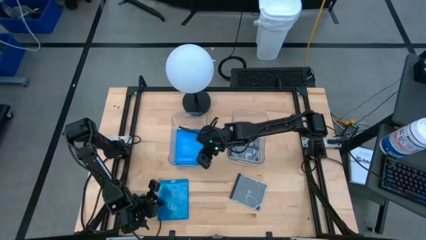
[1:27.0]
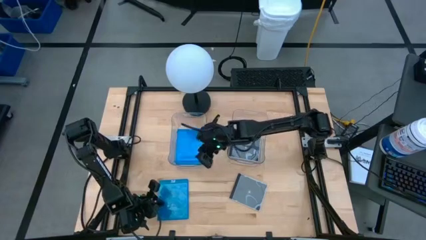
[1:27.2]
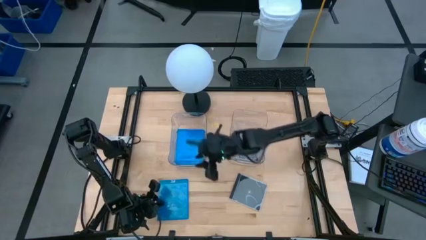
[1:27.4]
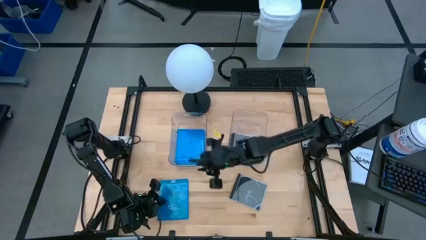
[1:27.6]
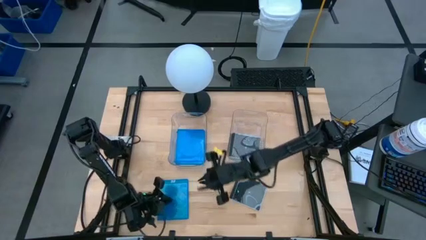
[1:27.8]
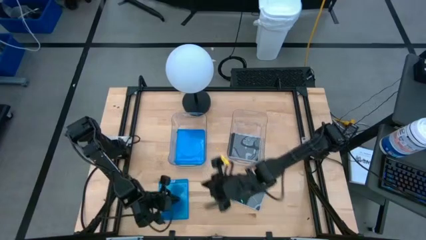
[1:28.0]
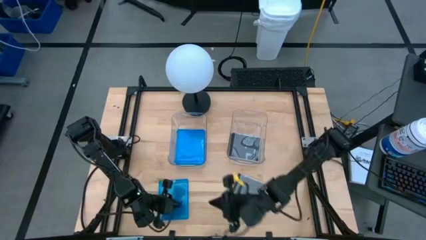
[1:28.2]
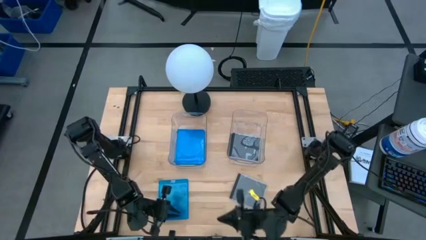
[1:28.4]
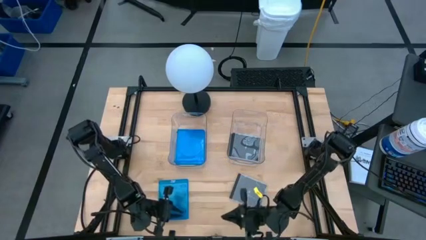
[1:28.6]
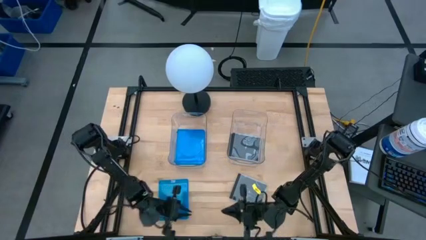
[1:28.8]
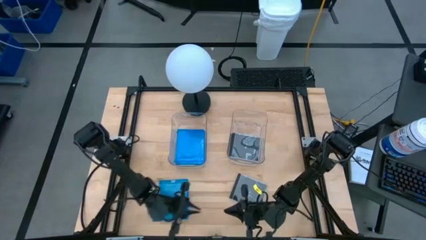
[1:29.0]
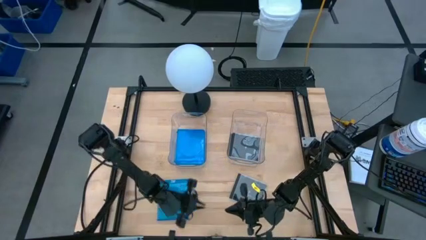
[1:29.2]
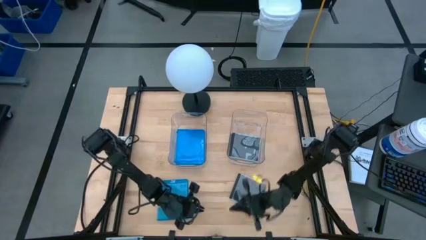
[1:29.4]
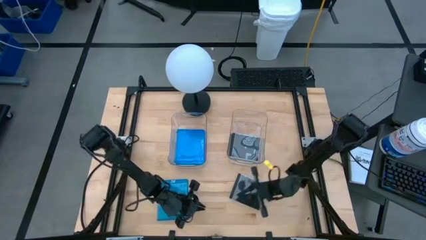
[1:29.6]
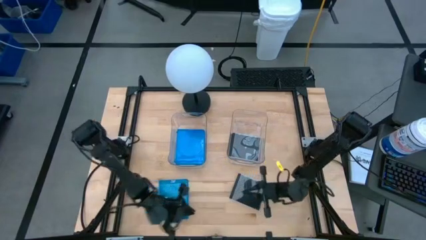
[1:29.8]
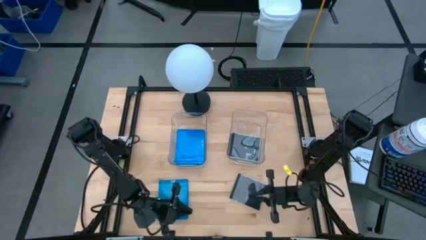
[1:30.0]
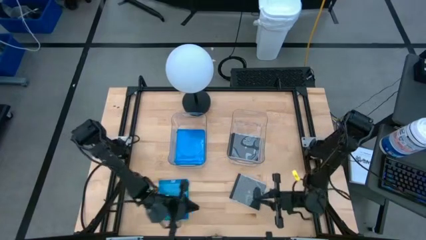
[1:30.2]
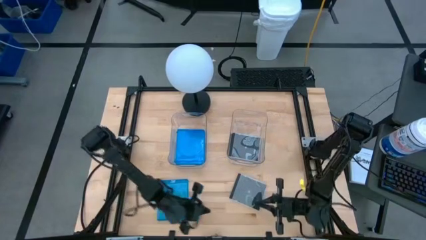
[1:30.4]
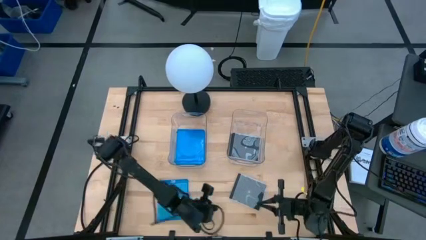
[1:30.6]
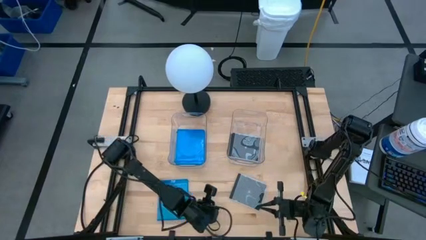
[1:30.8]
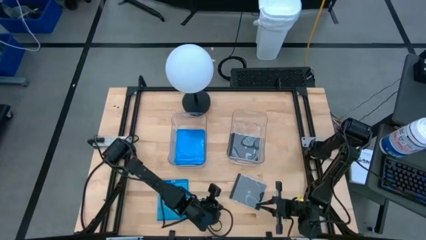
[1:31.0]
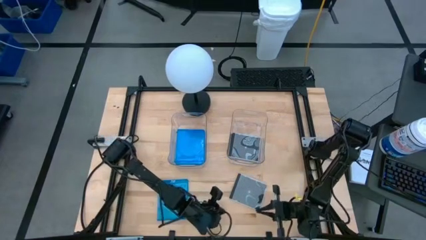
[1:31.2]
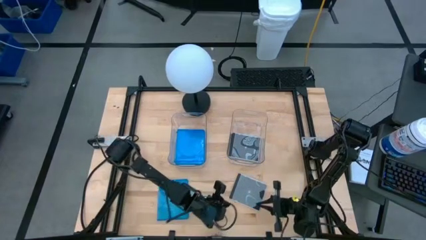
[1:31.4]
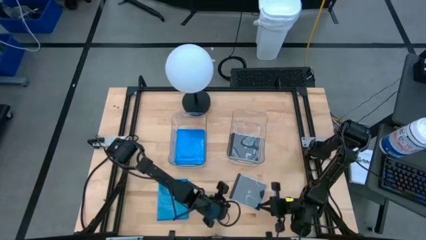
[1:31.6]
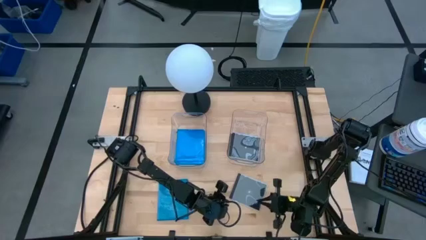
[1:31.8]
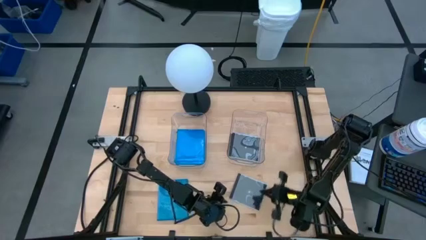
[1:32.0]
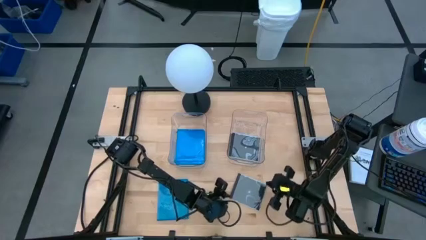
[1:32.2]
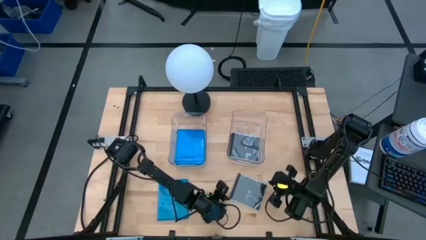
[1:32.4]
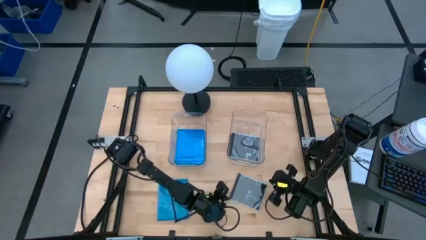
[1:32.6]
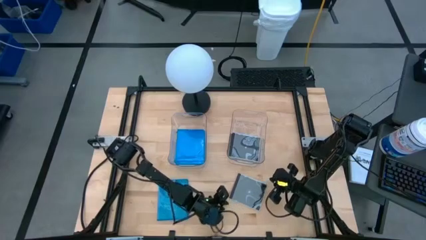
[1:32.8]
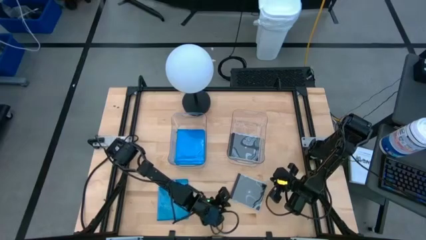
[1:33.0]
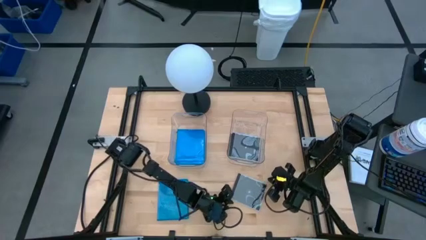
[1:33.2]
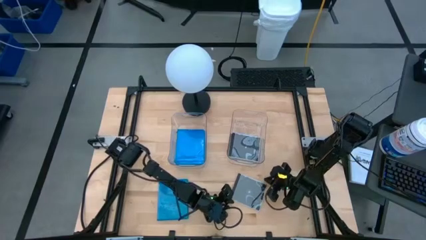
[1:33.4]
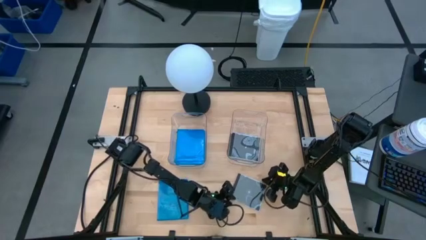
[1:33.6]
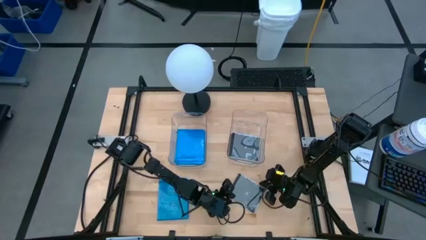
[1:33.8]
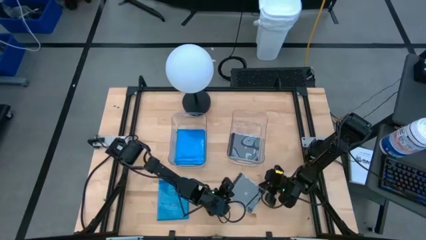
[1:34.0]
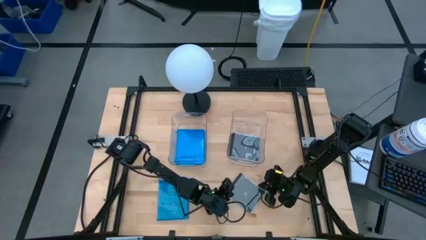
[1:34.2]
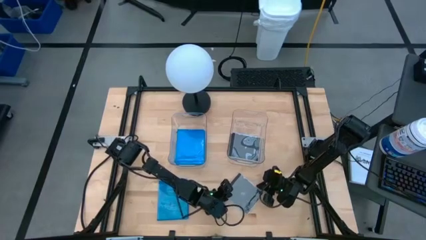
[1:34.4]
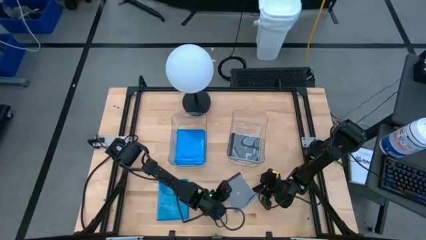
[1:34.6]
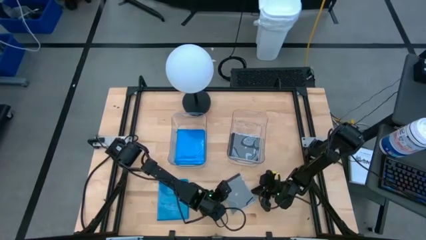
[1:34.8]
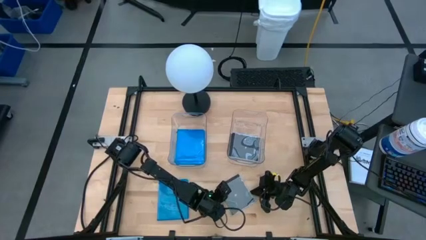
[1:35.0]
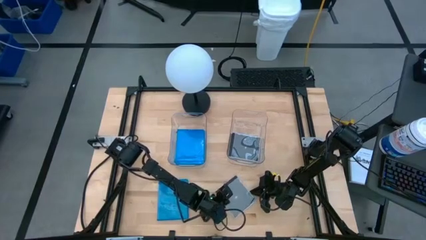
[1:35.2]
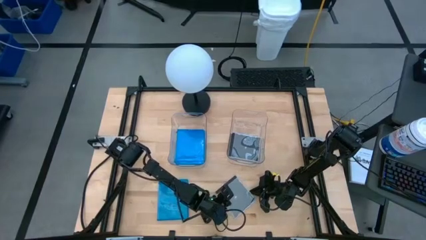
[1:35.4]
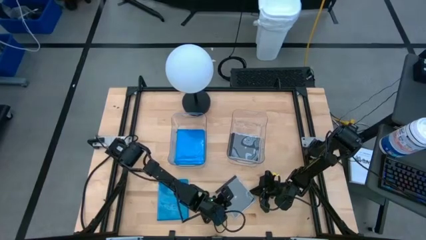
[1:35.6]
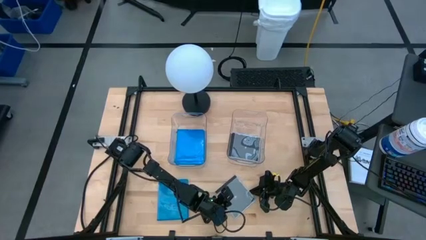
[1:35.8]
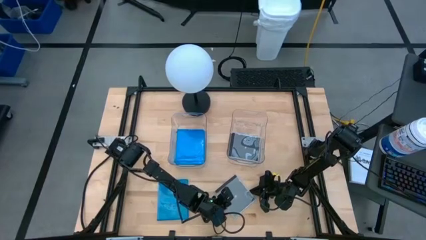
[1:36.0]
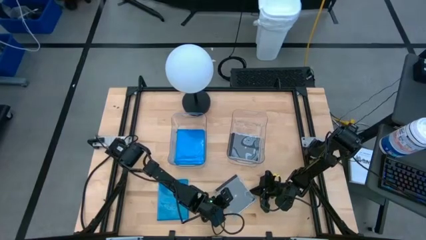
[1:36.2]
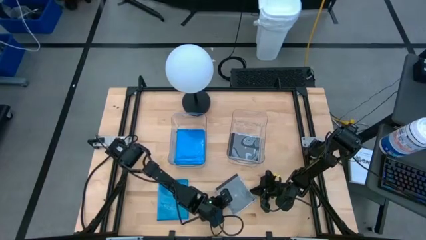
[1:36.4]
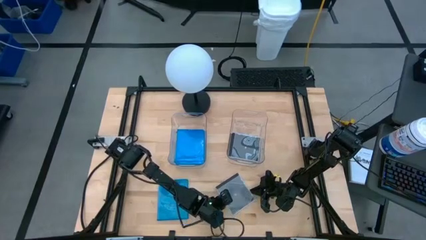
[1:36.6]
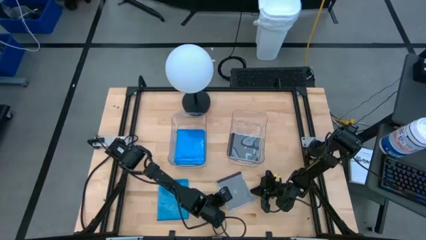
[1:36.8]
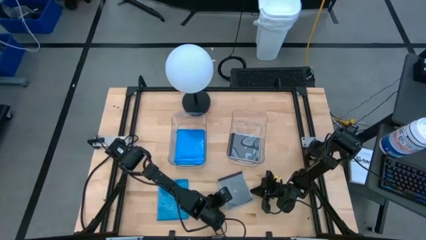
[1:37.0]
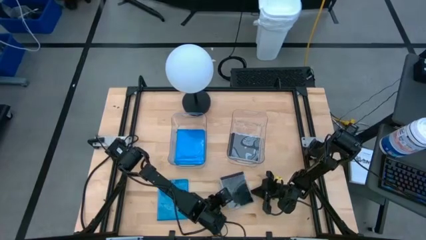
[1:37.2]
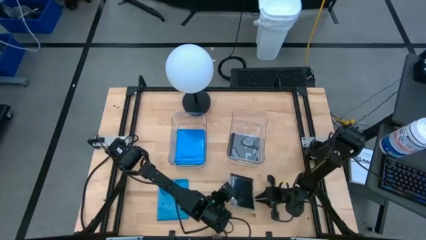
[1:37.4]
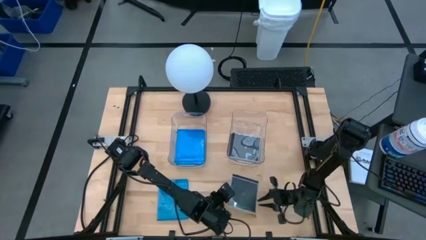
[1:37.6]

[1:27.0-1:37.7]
Task: Pick & place jewel cases by type
Put the black CD case into the right transparent bin
